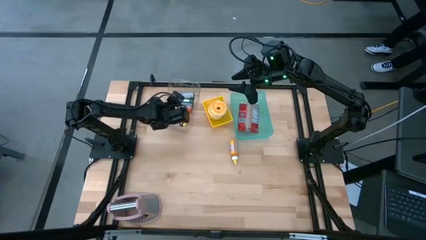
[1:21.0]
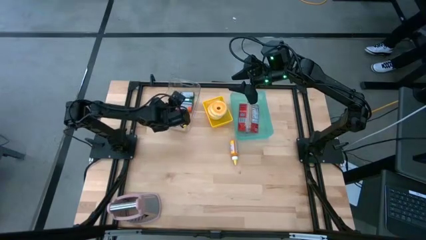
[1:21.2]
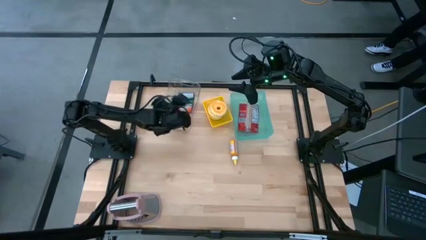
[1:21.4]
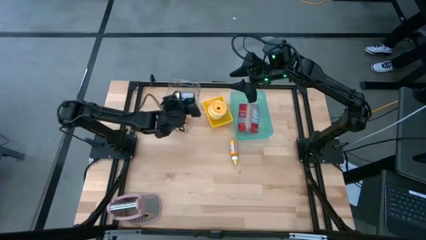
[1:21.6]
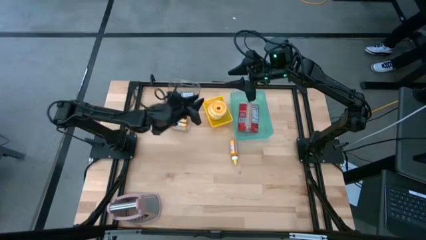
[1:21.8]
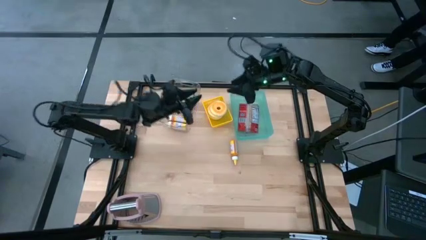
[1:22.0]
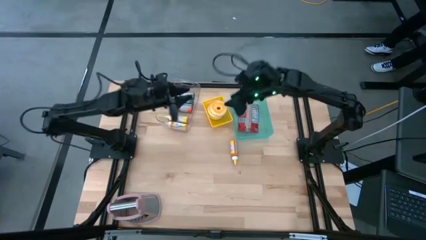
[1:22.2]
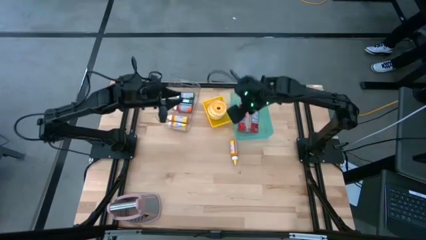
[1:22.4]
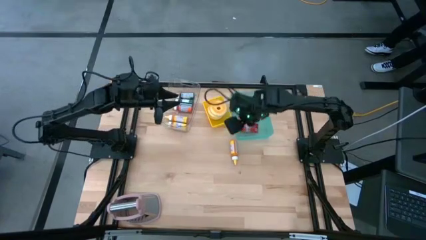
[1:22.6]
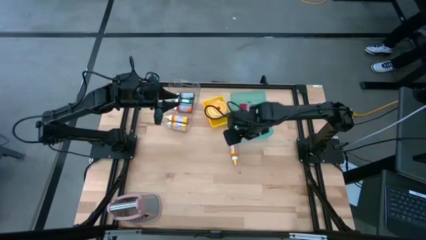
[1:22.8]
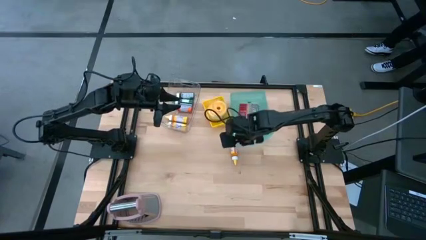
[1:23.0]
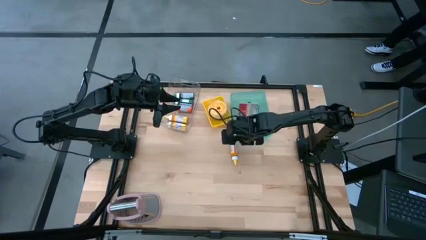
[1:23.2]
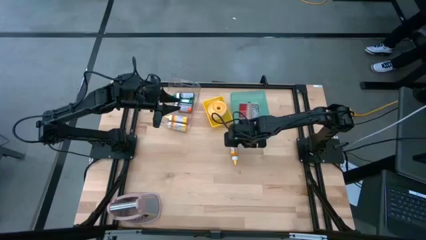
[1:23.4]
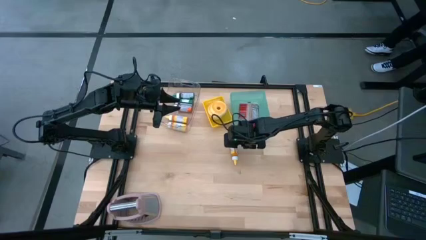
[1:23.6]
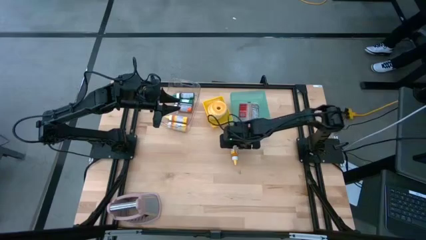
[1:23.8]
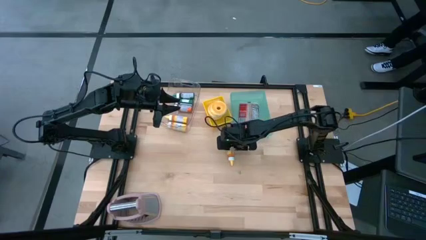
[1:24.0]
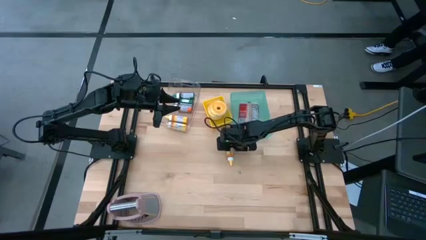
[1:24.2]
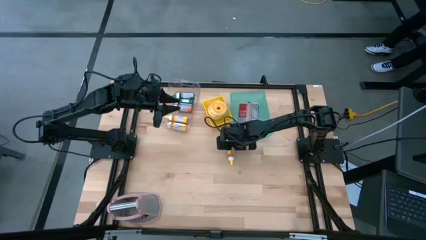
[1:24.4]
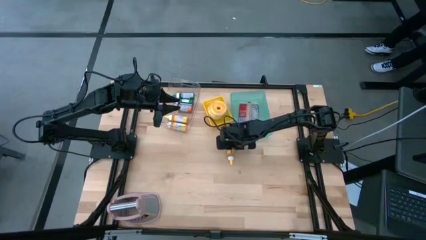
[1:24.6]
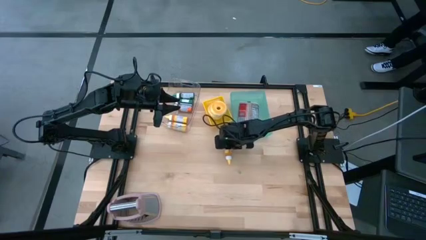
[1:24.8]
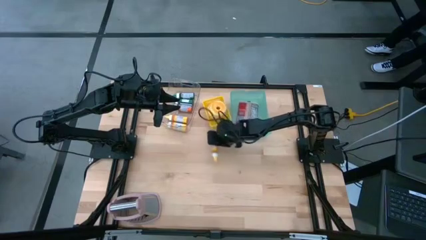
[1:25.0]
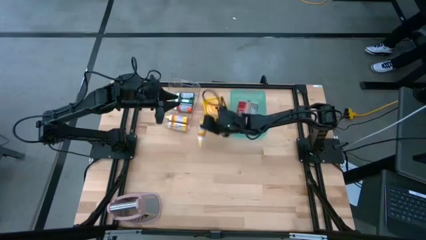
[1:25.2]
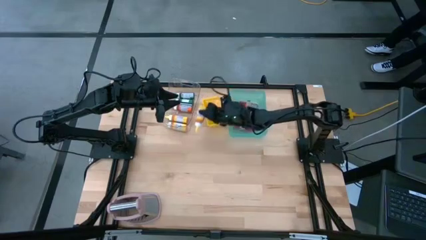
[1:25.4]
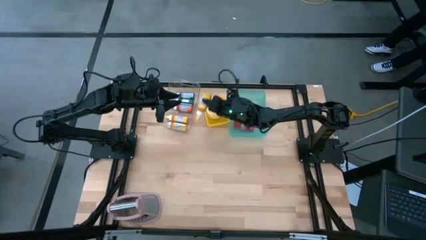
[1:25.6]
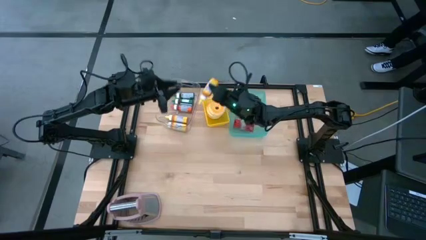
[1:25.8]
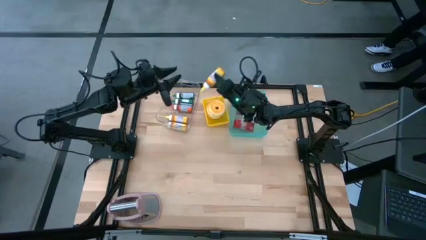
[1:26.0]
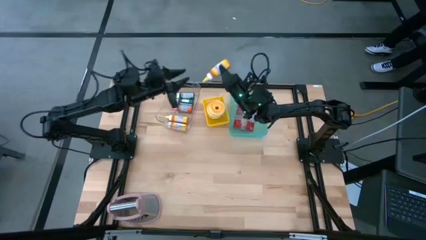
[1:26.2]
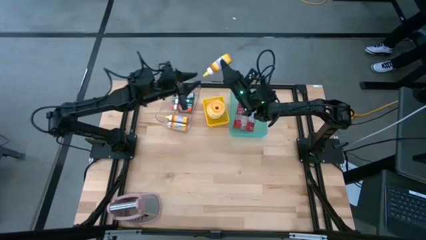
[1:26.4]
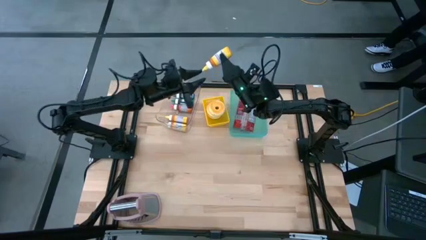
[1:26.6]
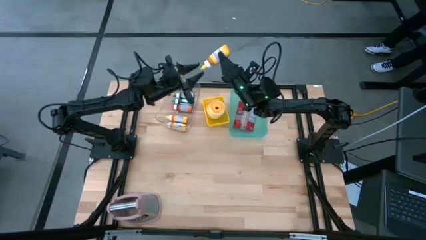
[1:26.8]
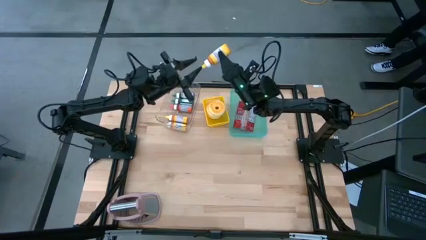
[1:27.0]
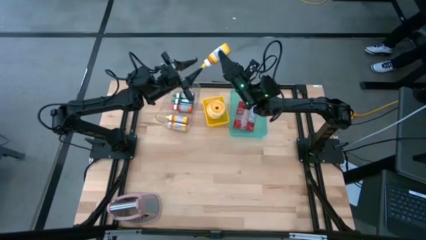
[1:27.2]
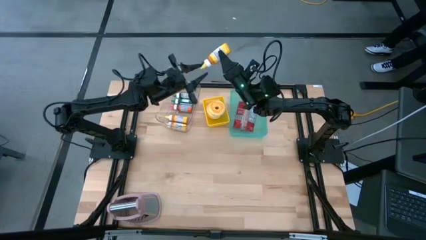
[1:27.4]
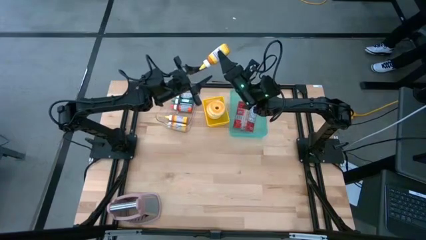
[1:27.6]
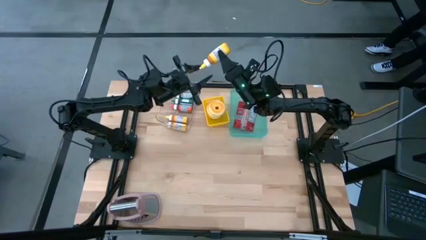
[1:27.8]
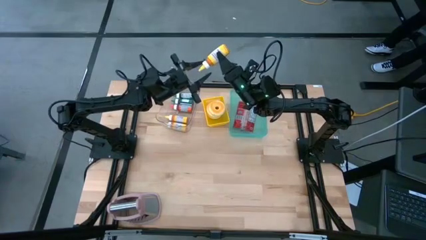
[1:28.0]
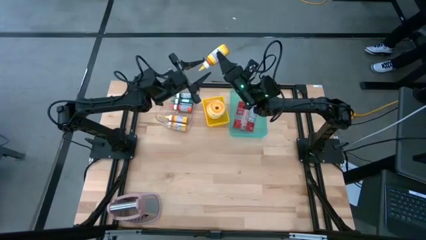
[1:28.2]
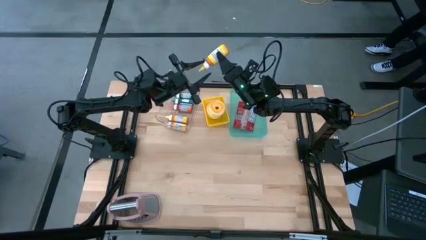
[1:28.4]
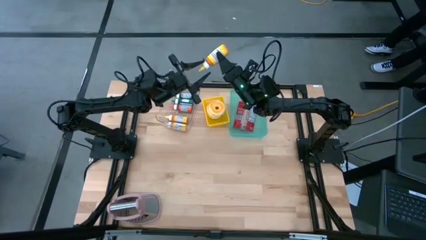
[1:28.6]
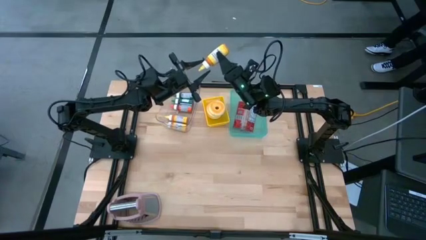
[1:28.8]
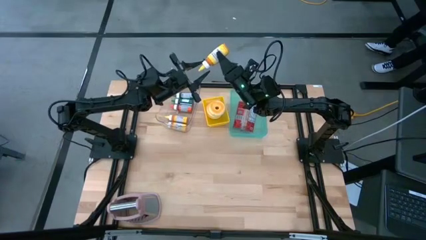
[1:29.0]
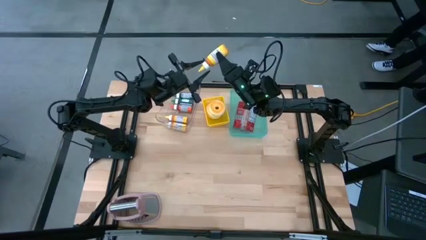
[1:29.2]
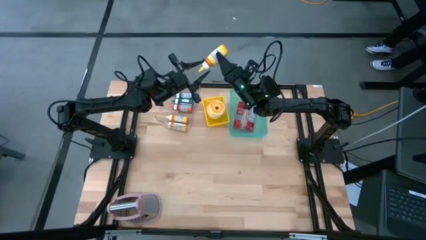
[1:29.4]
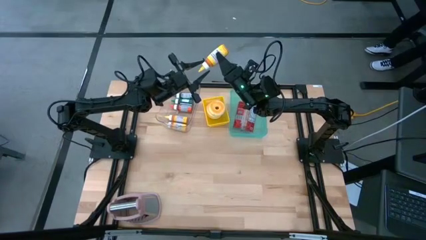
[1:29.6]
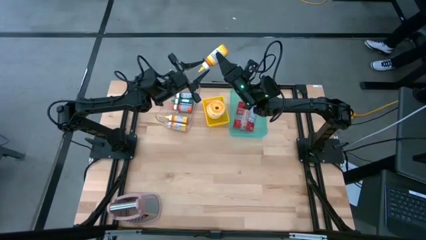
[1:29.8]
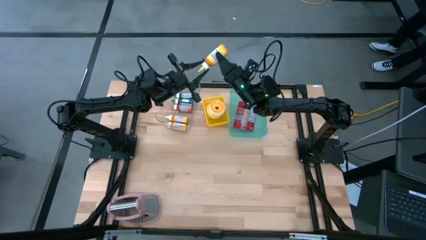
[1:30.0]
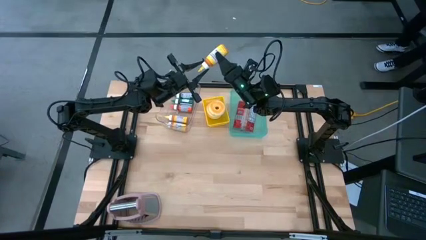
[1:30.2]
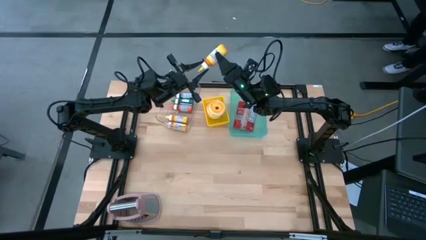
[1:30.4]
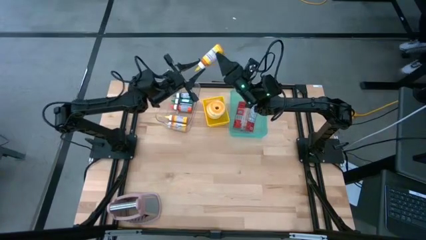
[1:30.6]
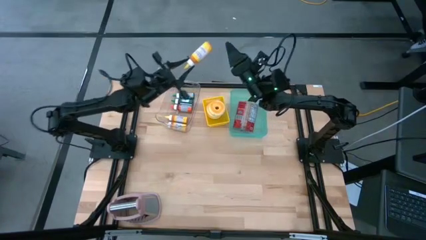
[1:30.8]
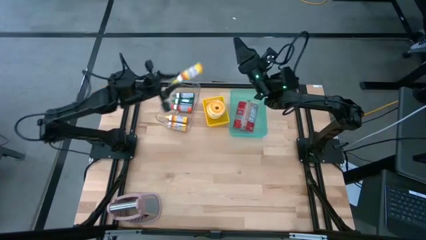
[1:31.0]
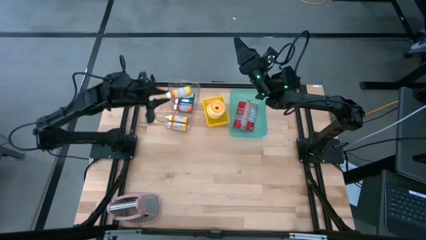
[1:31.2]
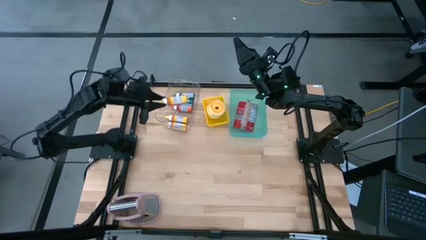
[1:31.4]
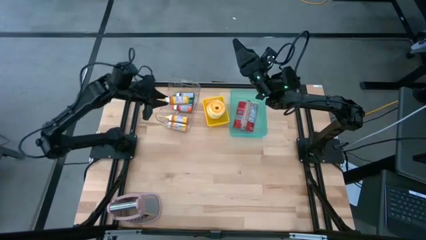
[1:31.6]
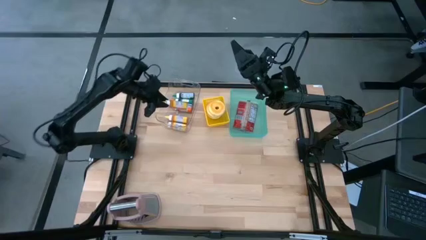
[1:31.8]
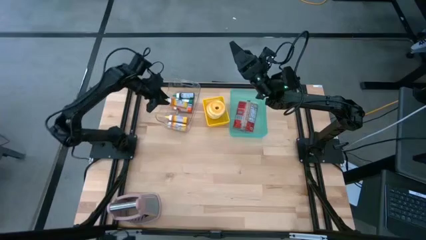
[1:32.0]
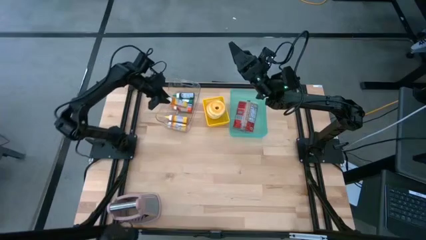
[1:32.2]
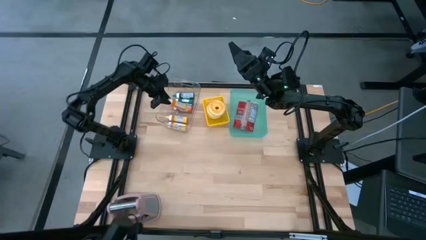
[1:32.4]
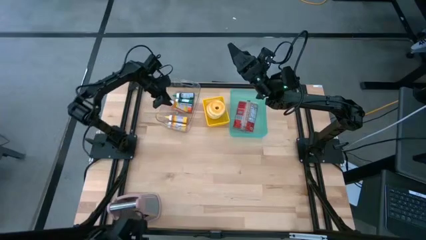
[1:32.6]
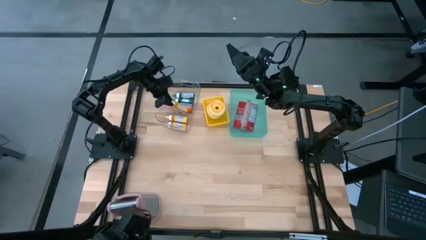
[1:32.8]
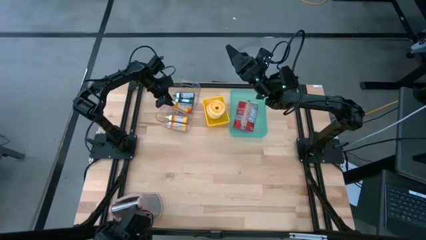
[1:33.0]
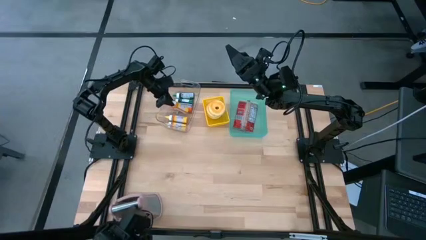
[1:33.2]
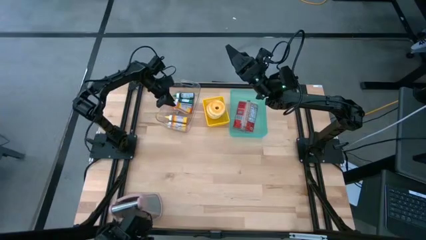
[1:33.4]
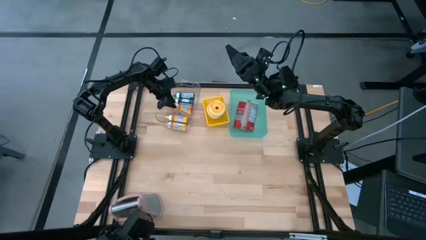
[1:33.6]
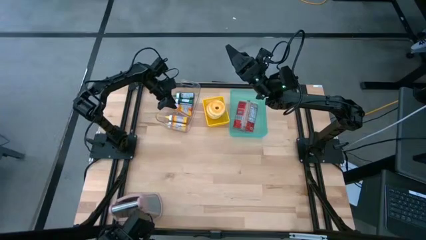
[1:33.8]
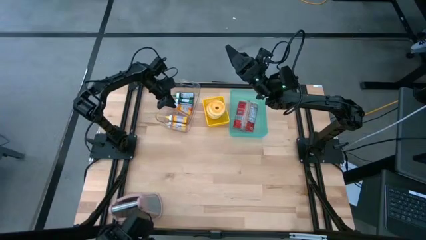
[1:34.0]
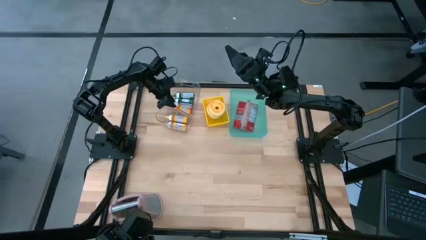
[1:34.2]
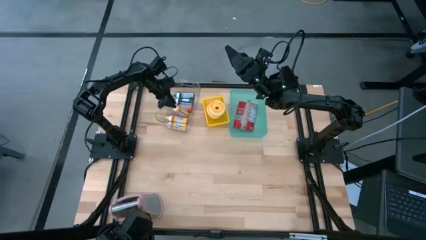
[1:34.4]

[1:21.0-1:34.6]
Put the yellow food coloring bottle into the transparent bin
